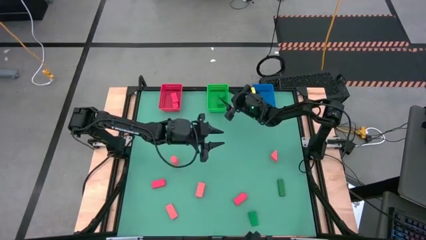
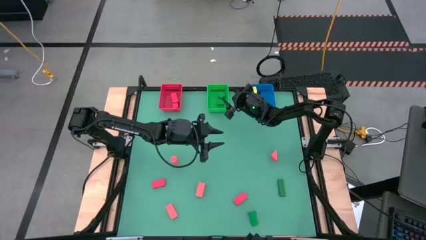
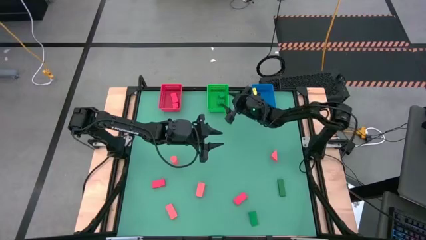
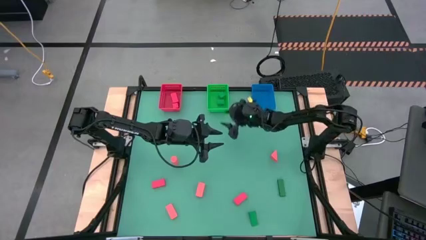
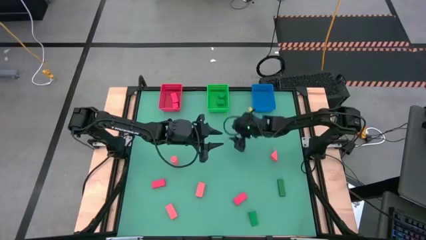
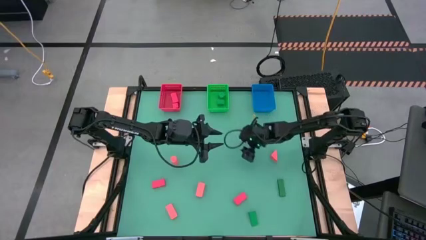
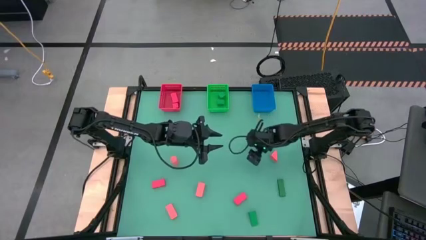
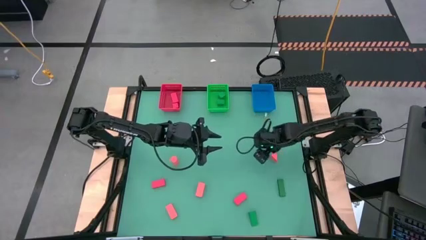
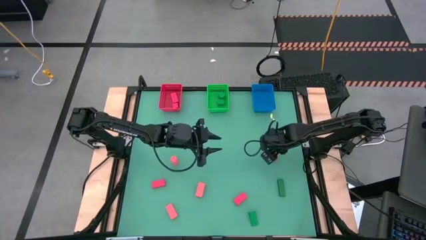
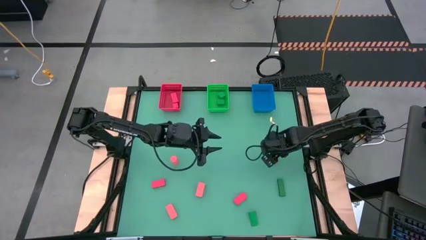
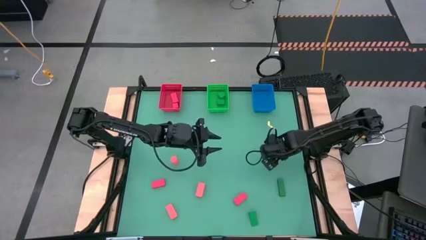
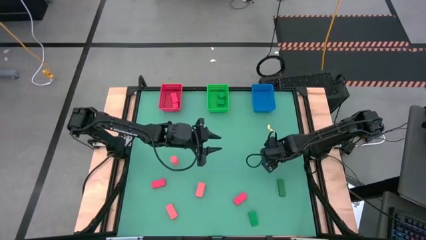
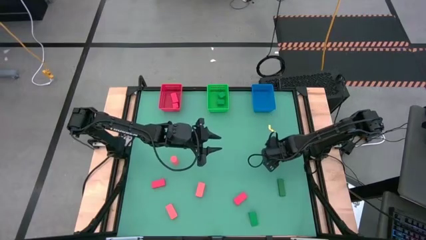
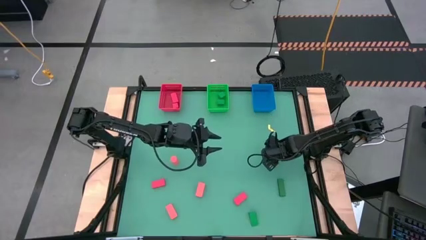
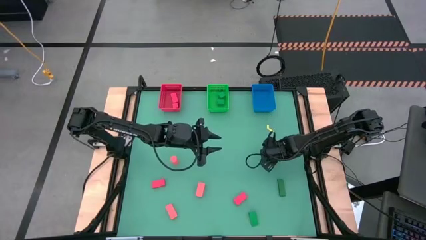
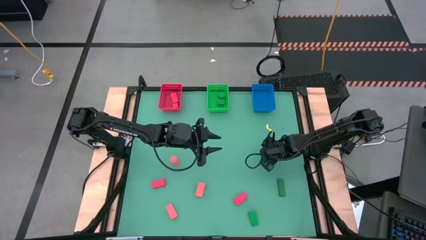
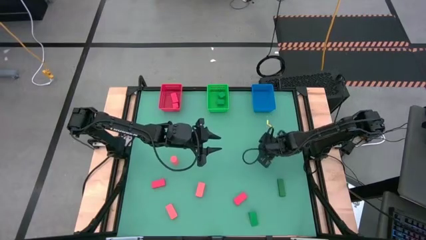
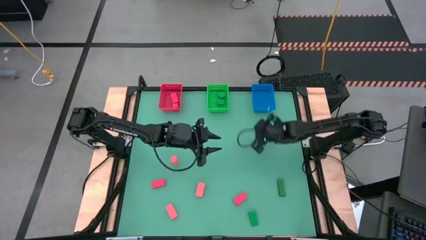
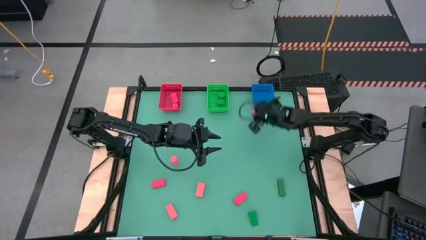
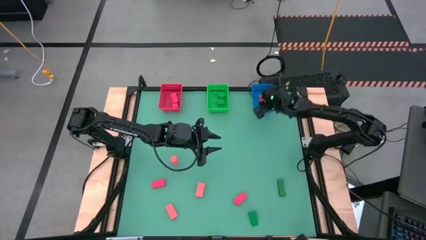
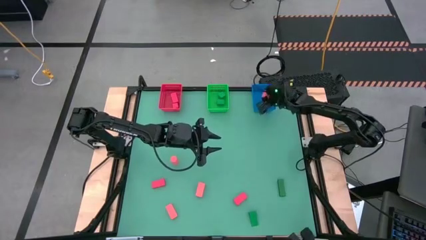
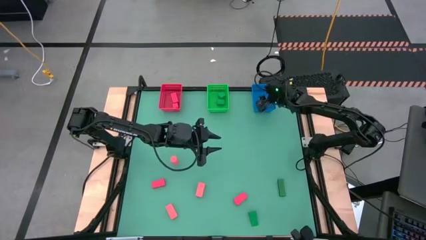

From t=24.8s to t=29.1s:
Task: Sort & place blocks by color
Put the orange block into the blue basket

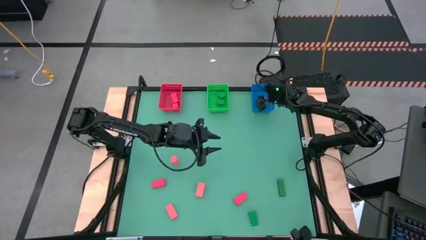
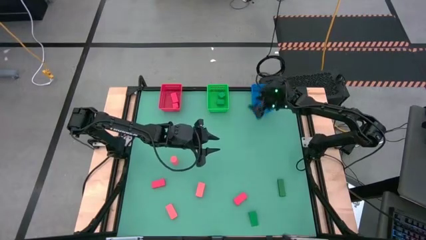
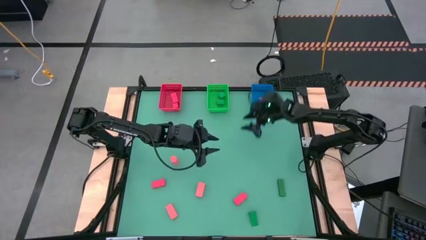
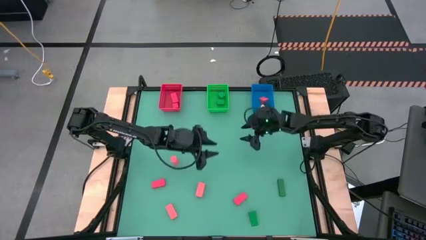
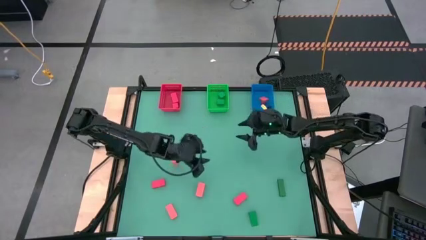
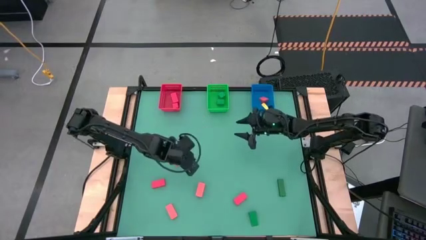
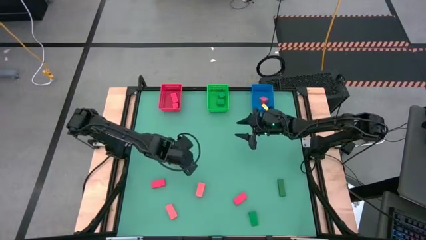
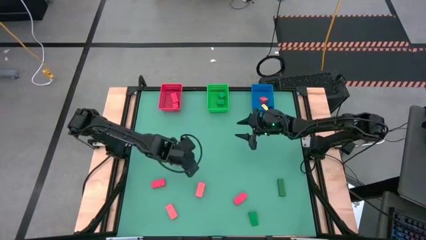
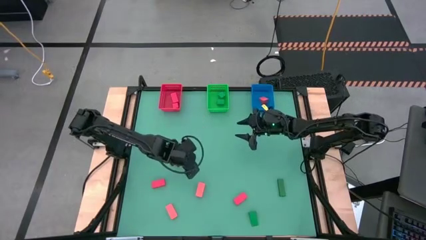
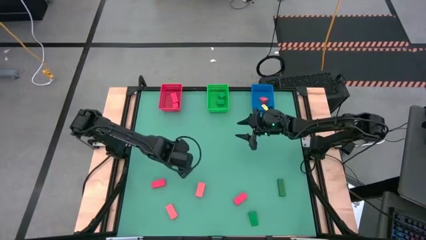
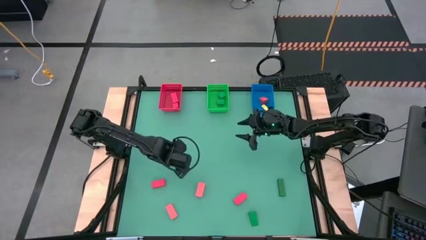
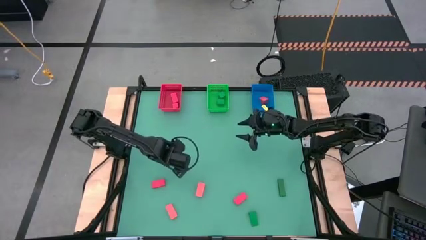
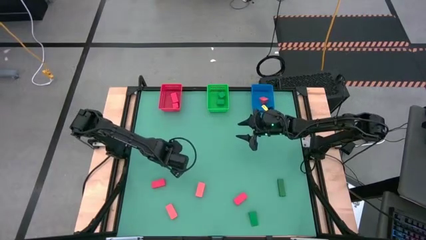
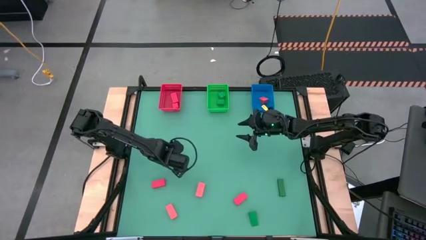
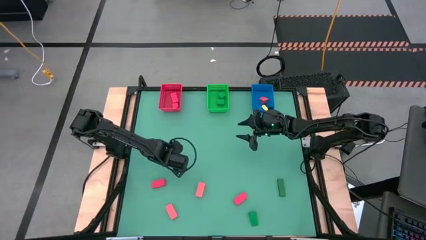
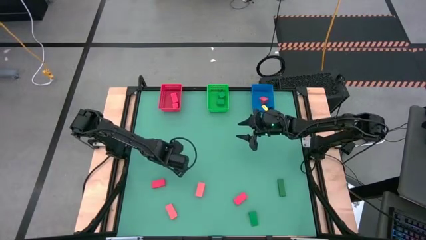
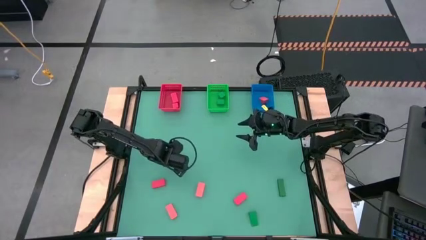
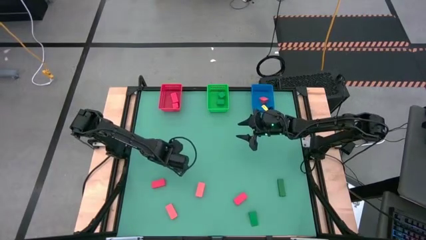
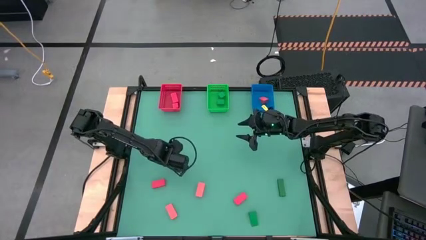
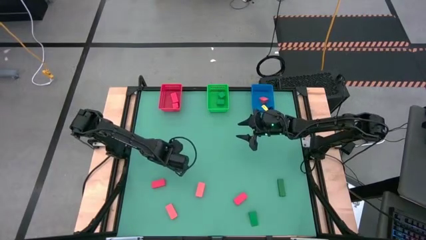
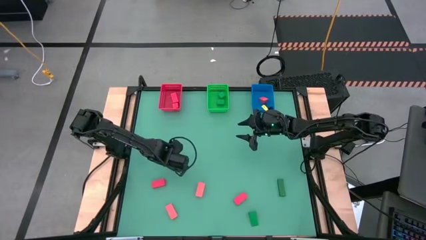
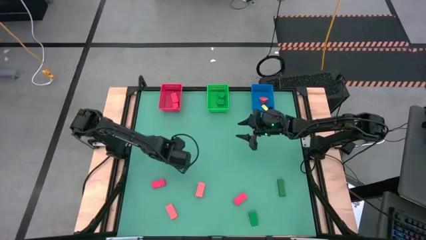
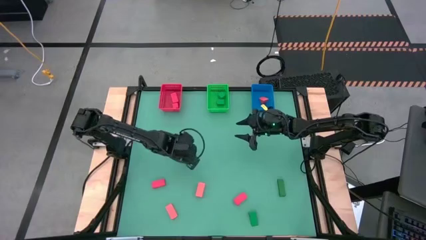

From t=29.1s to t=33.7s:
Put the orange block into the blue basket

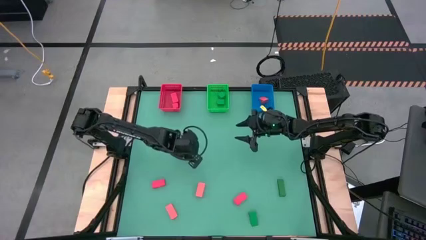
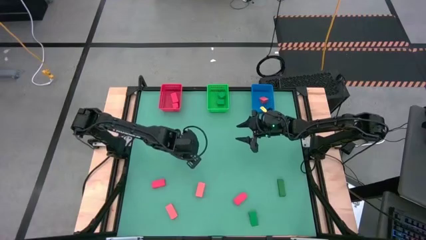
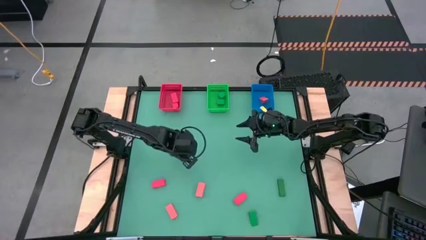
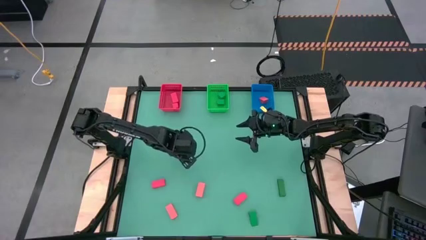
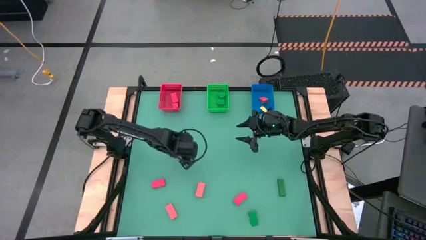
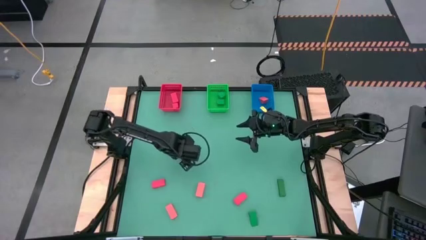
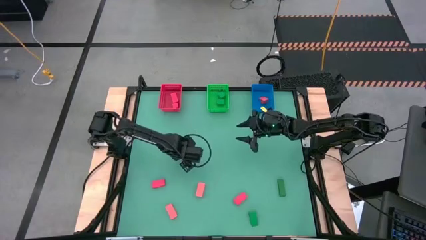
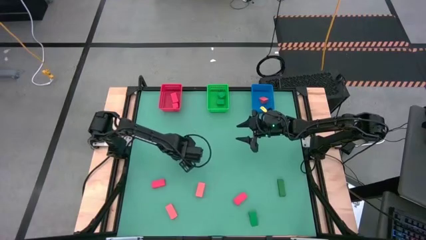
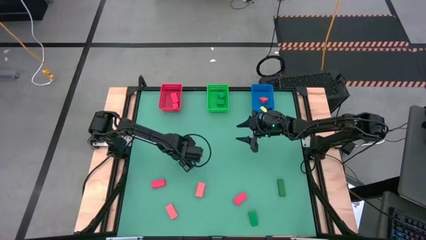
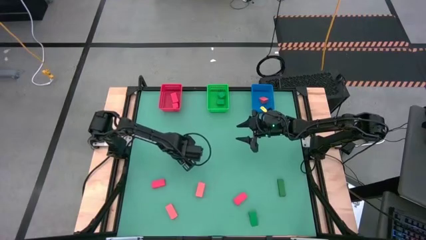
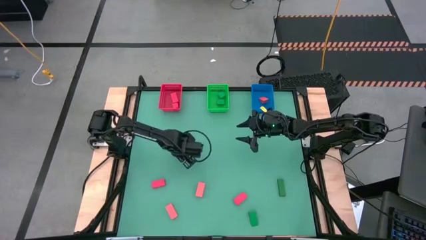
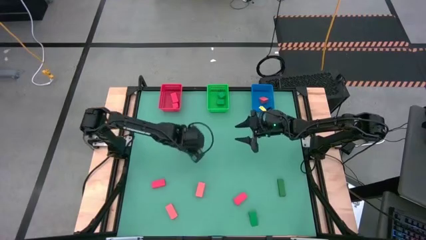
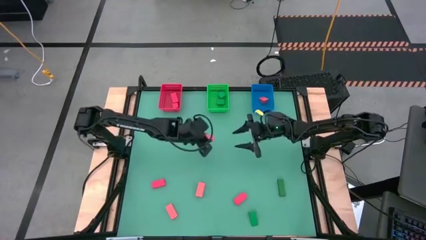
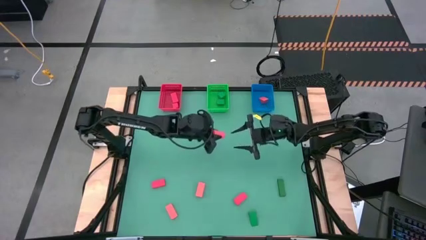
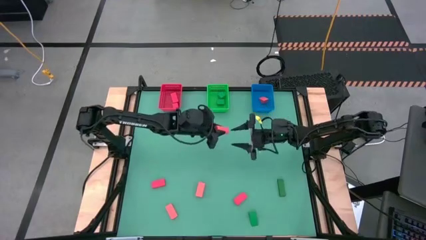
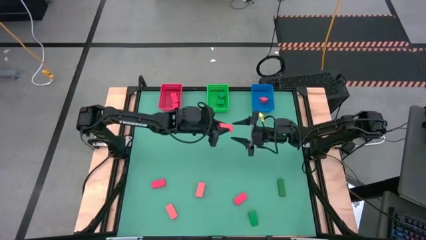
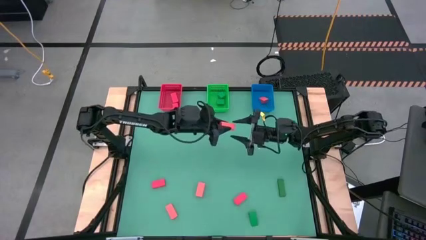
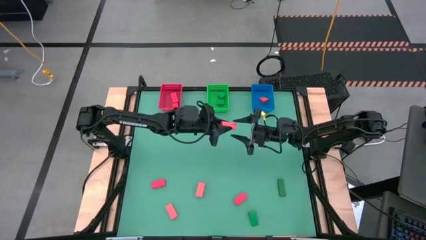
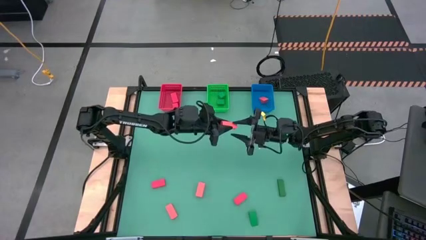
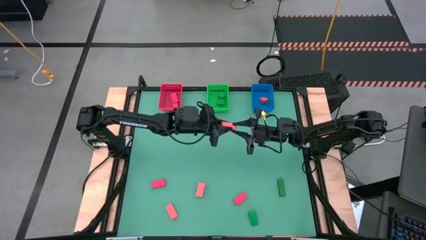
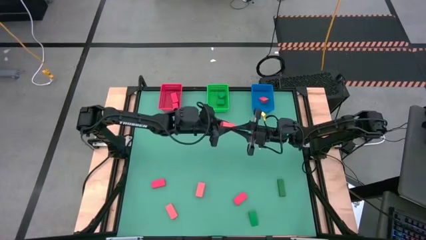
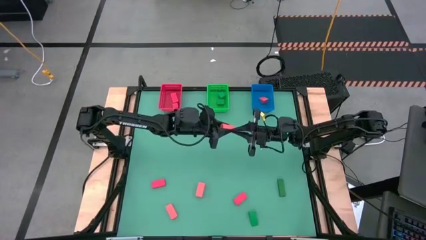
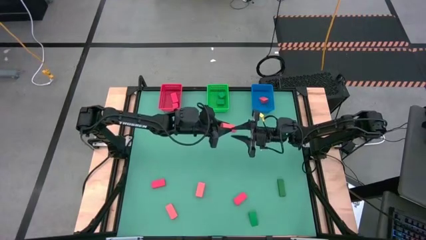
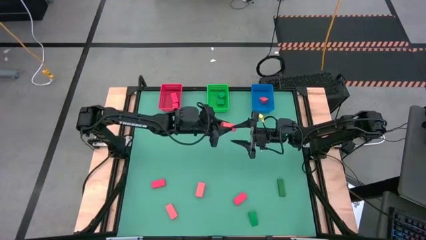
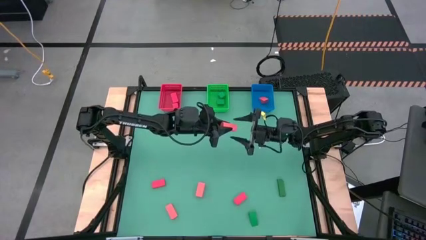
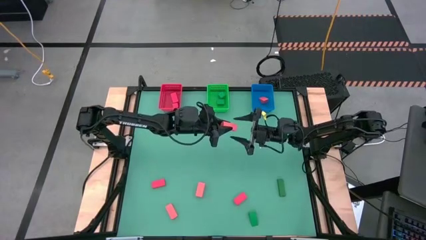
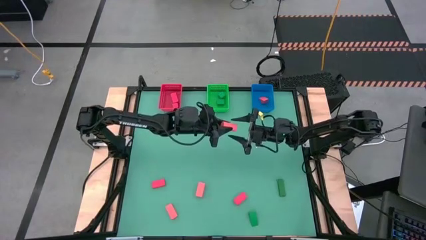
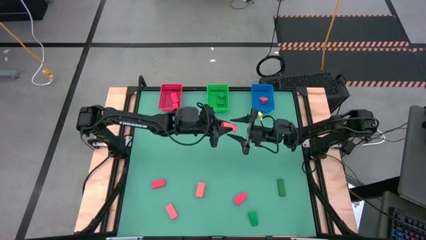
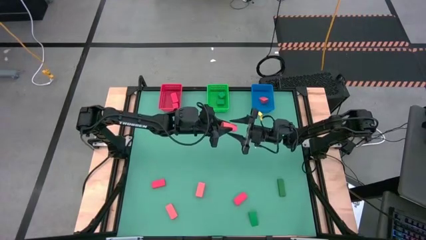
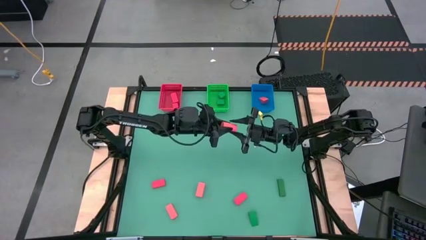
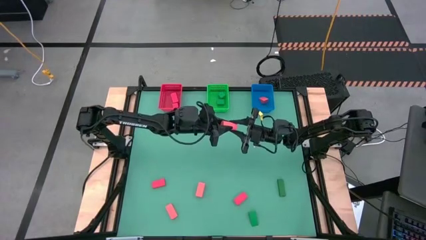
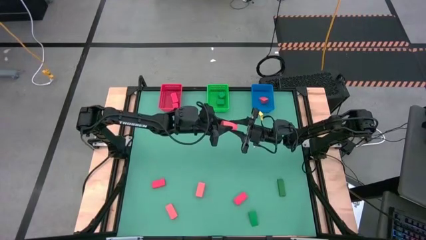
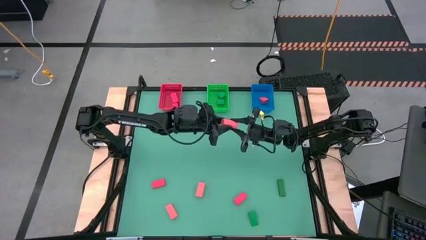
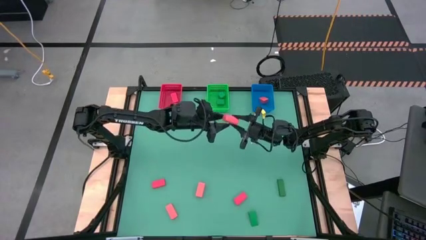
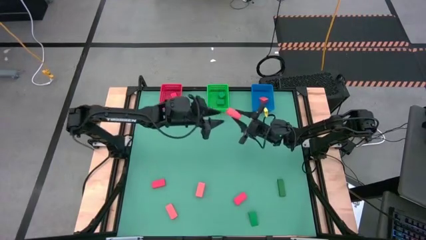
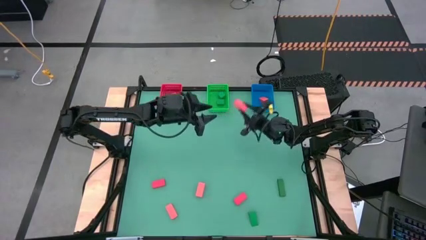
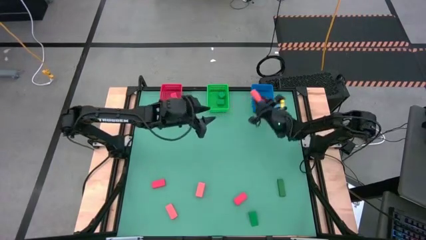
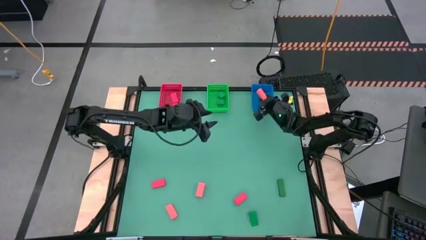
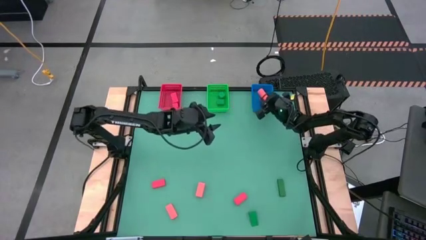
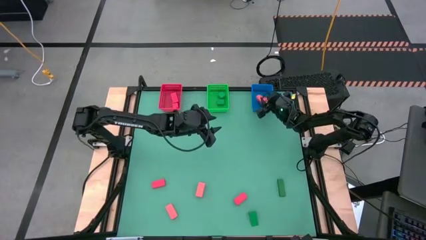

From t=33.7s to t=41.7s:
Put the orange block into the blue basket
